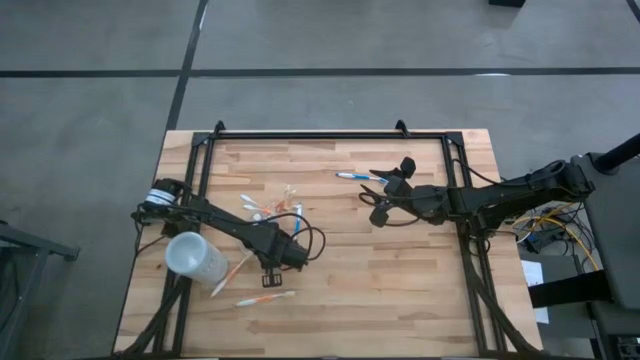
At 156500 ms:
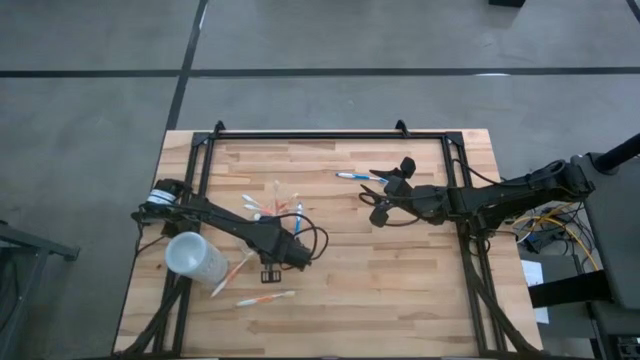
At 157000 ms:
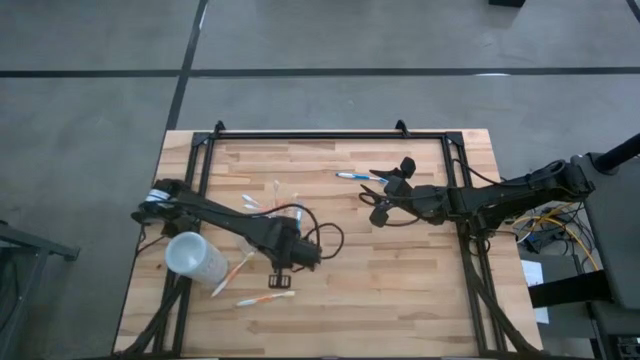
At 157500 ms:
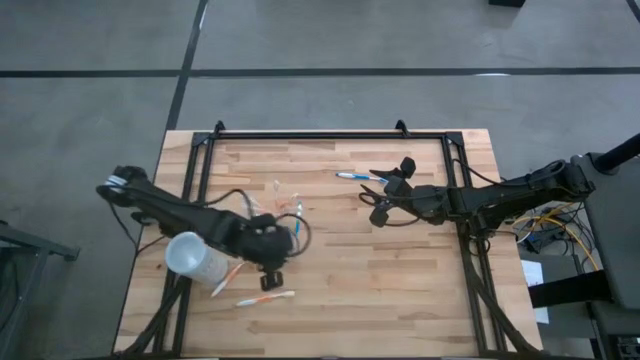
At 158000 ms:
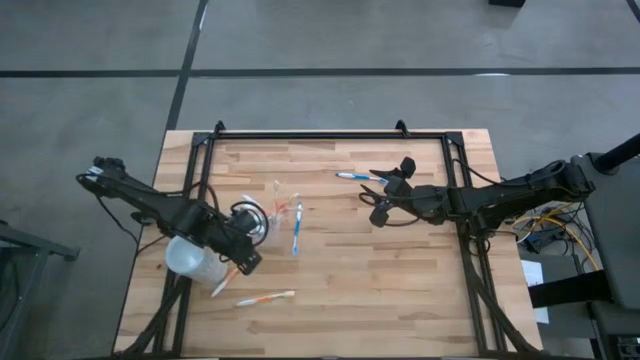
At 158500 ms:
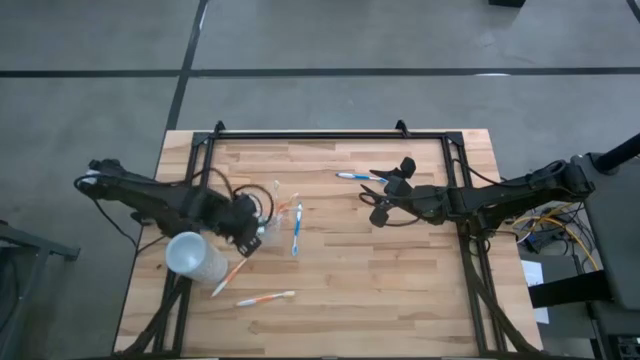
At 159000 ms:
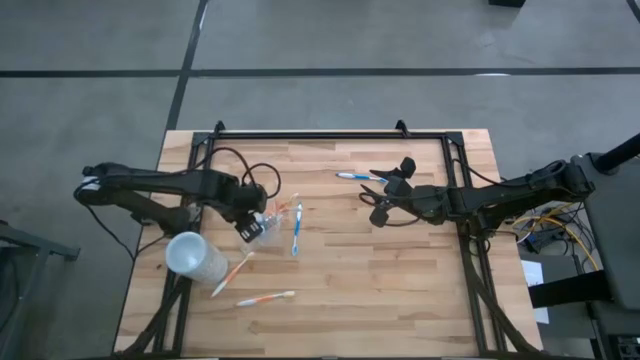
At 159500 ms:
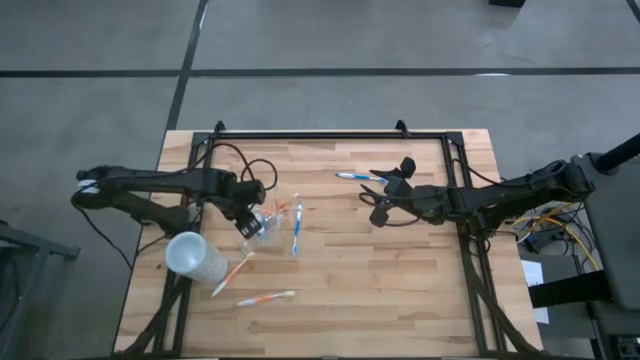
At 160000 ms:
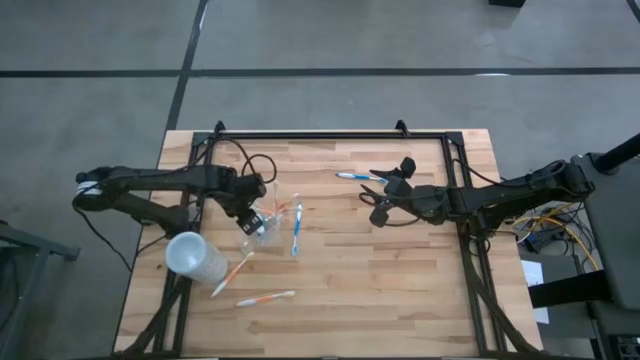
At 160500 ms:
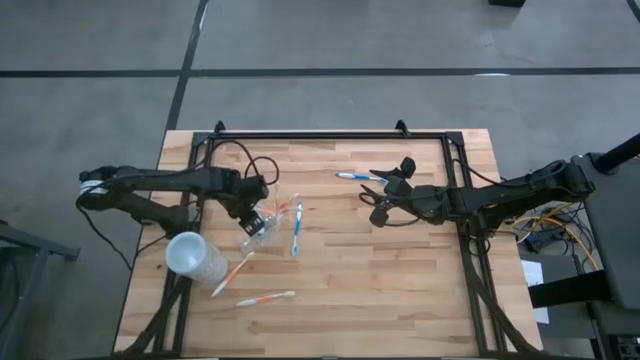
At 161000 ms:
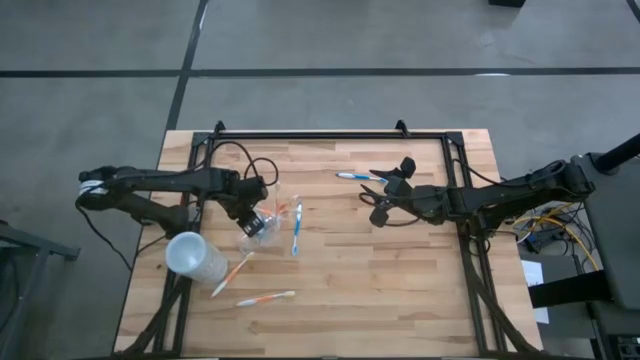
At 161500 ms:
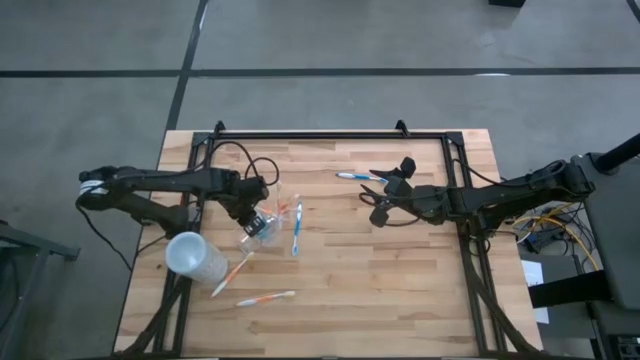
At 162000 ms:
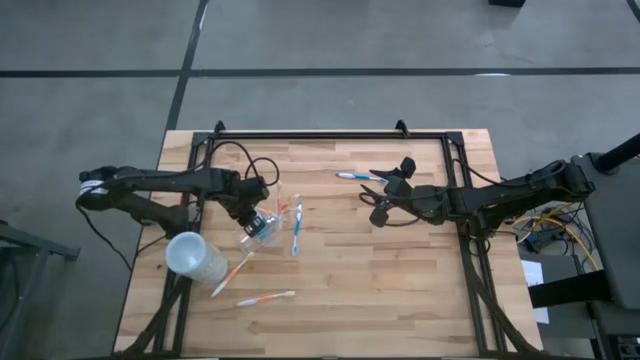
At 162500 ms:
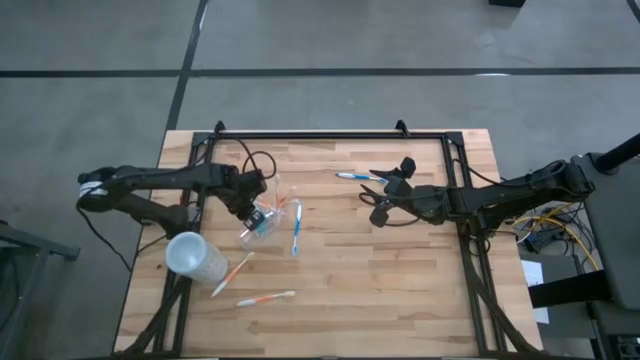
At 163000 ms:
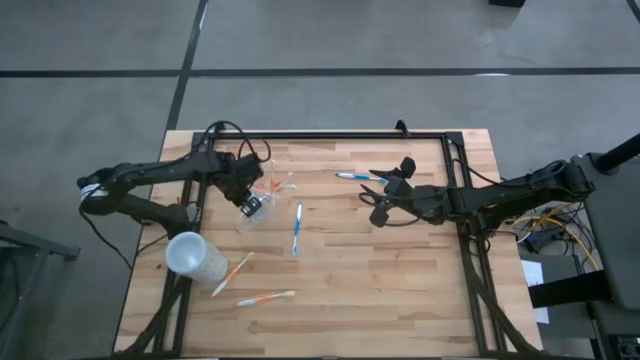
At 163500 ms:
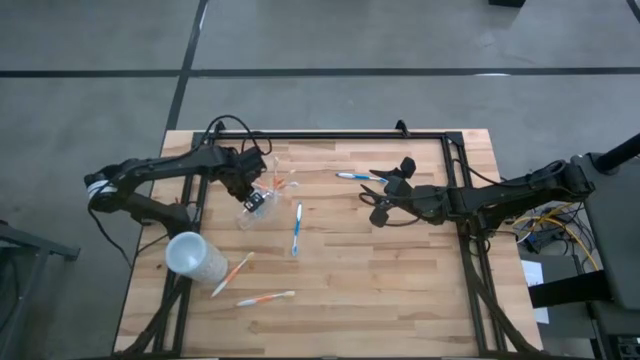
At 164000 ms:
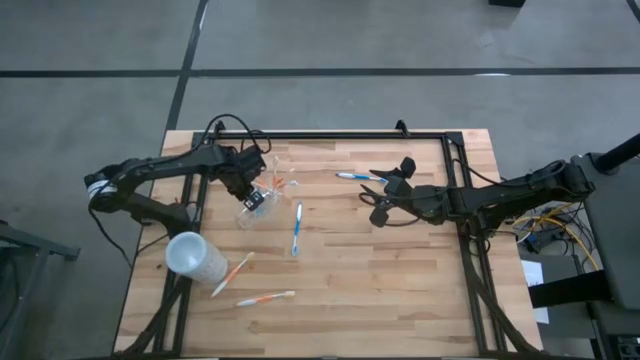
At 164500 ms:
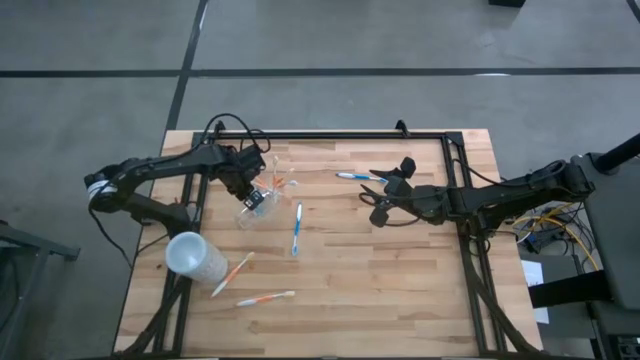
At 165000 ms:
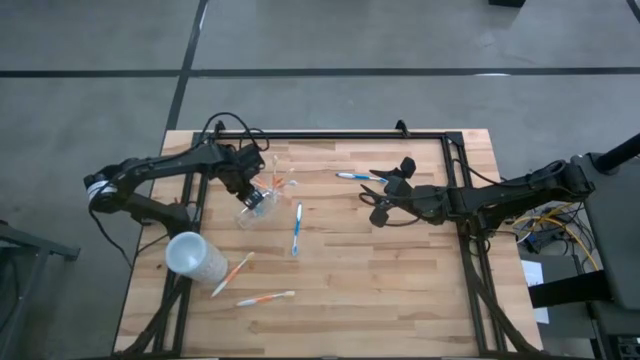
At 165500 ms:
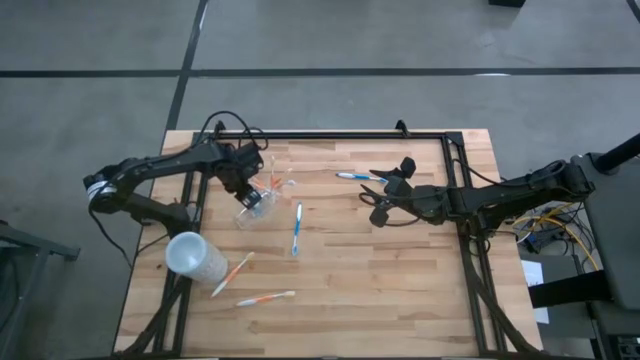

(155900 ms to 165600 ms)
Task: Pick & Place toothbrushing station
Adjust the transparent organizer

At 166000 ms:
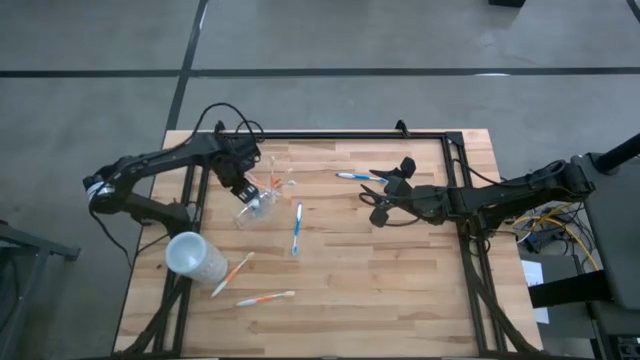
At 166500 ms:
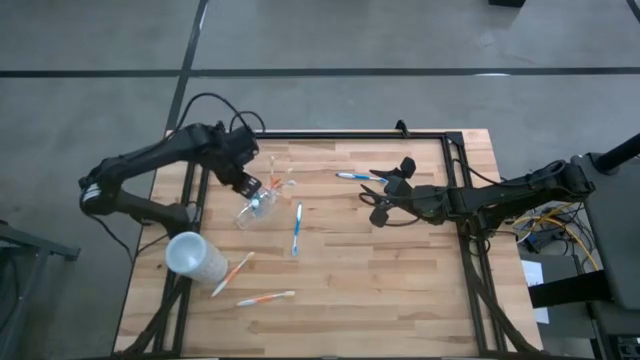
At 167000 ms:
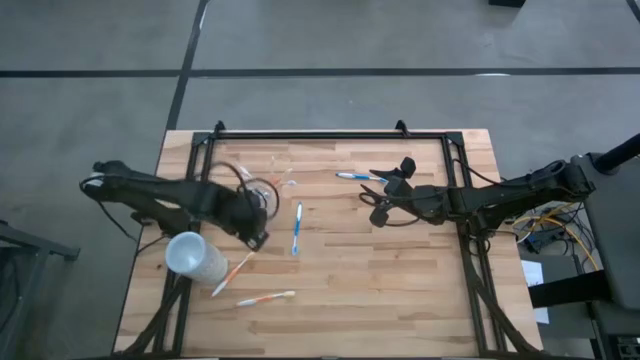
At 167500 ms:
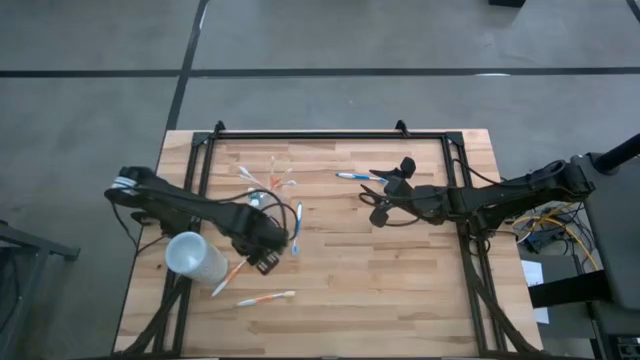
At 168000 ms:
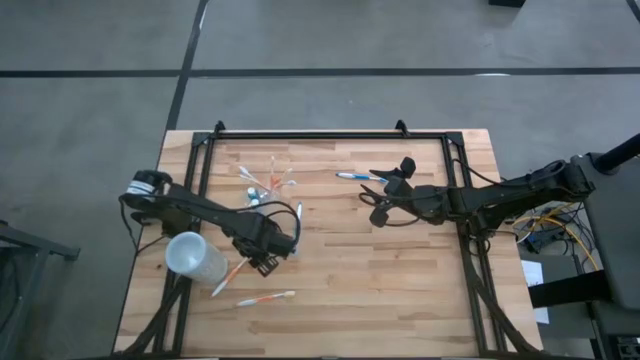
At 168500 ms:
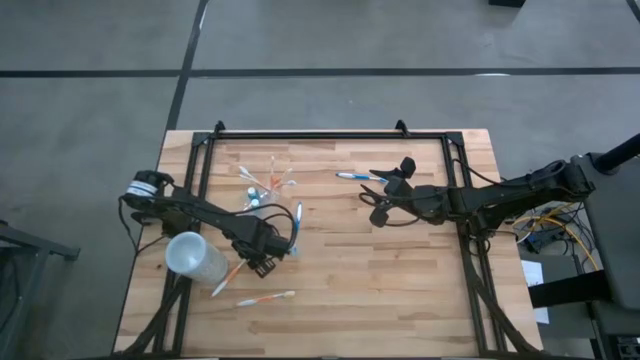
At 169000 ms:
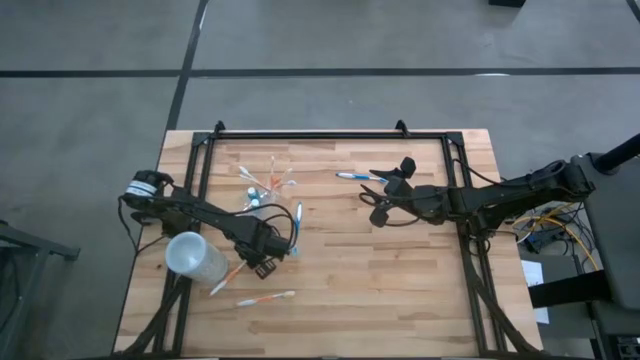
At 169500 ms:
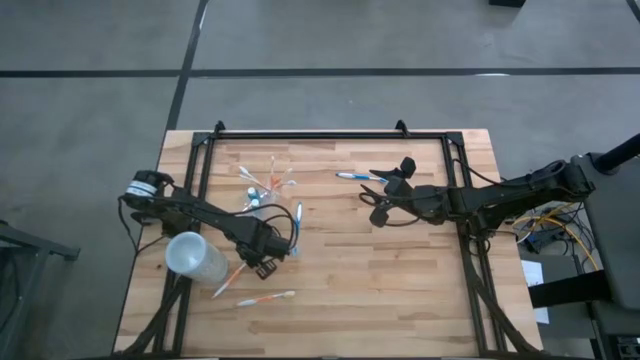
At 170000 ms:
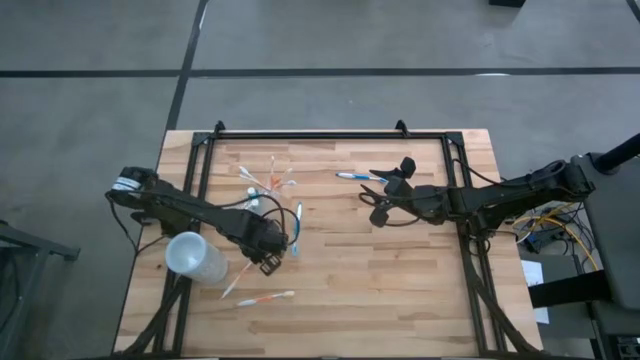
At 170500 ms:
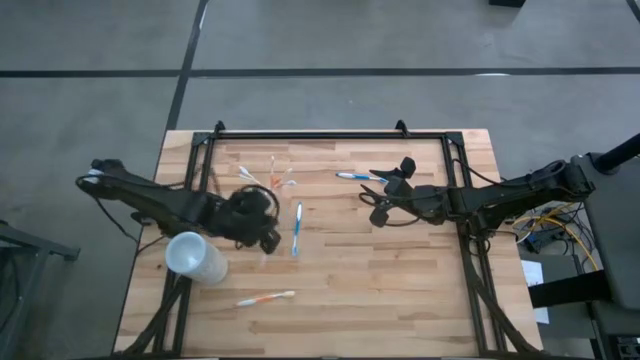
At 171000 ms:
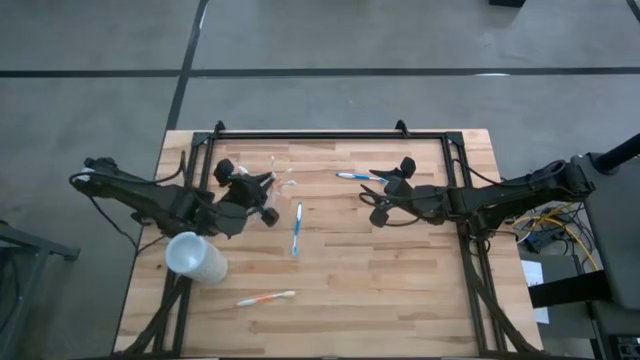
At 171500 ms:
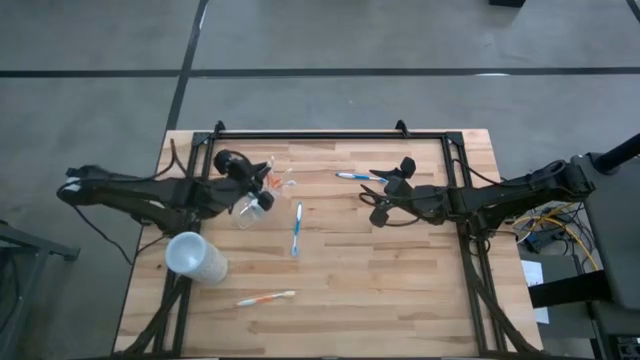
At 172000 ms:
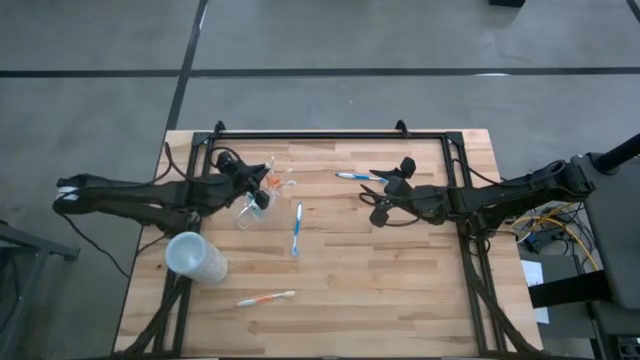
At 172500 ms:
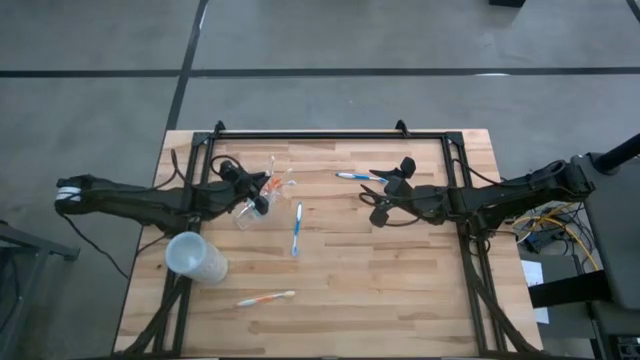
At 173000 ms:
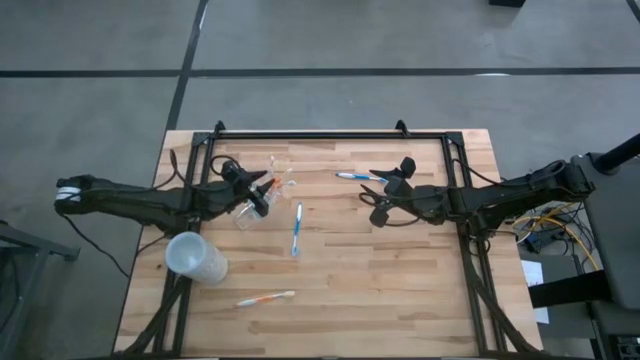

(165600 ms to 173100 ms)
Put the orange toothbrush into the transparent organizer

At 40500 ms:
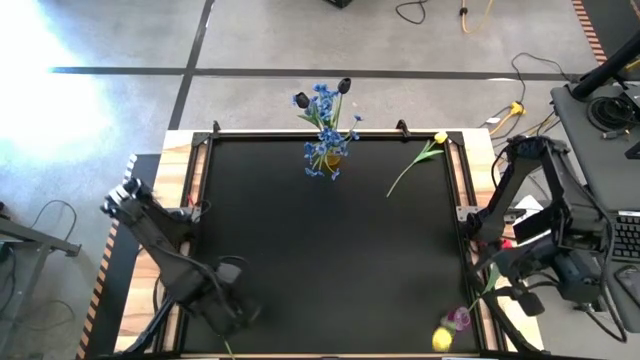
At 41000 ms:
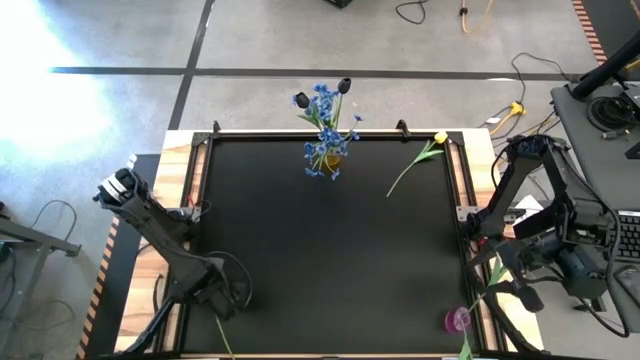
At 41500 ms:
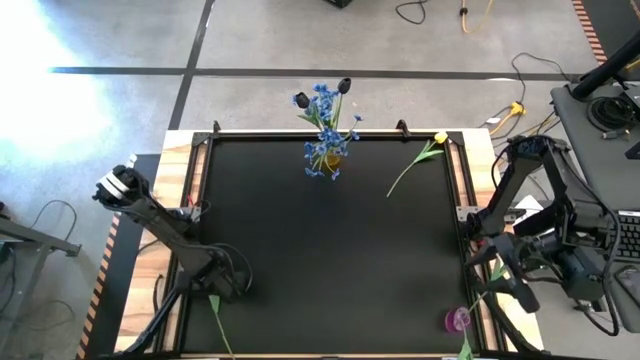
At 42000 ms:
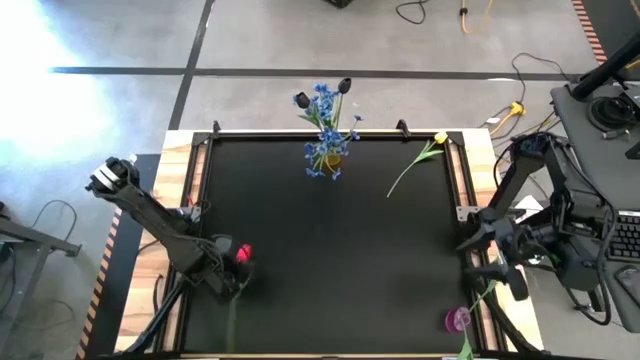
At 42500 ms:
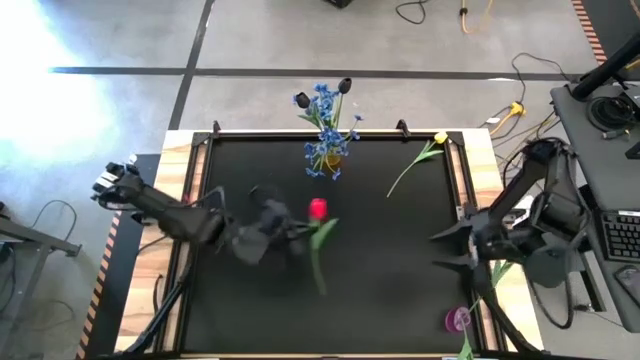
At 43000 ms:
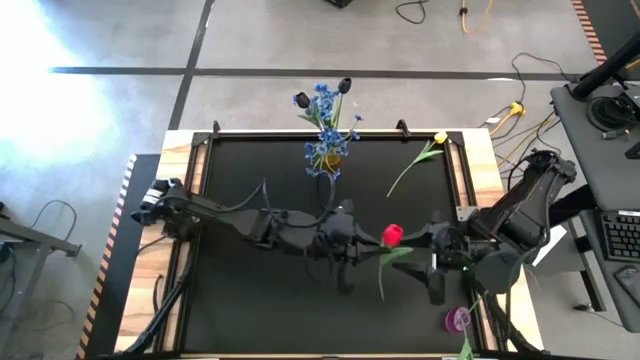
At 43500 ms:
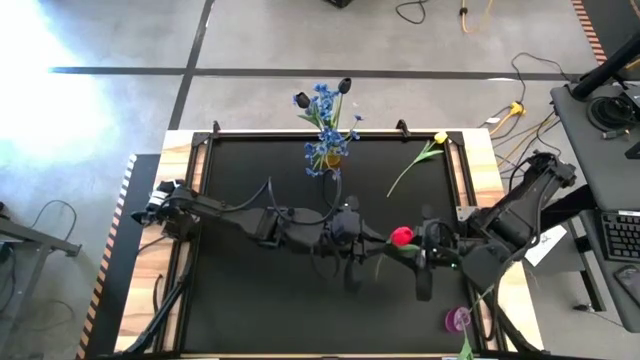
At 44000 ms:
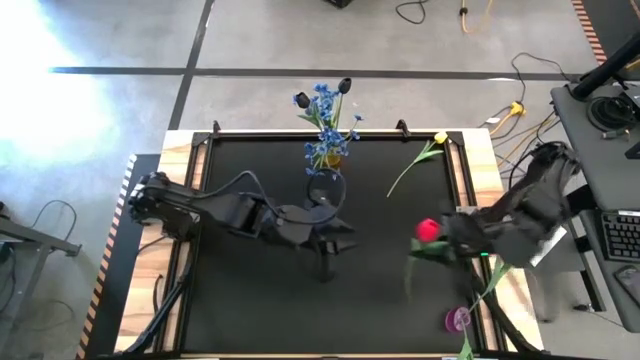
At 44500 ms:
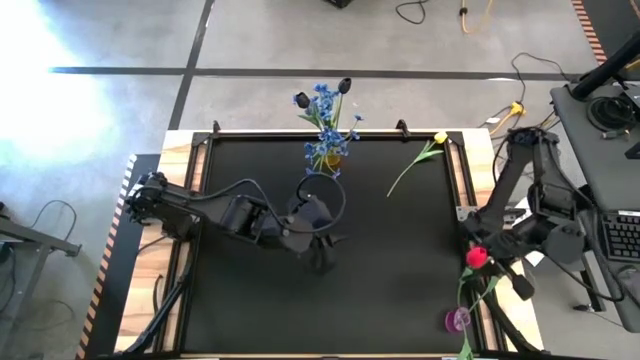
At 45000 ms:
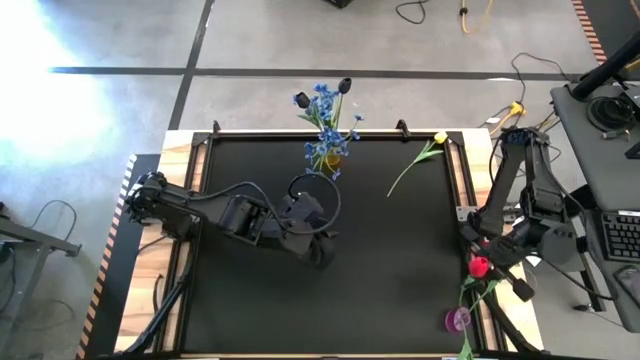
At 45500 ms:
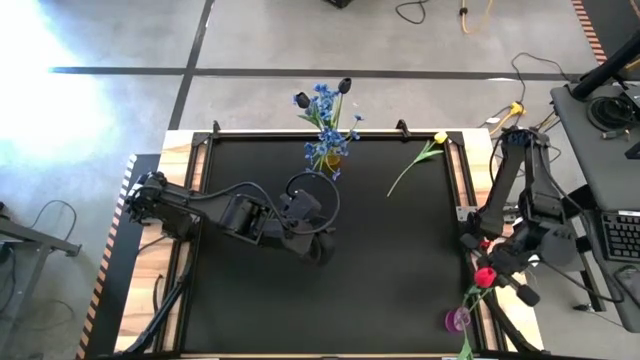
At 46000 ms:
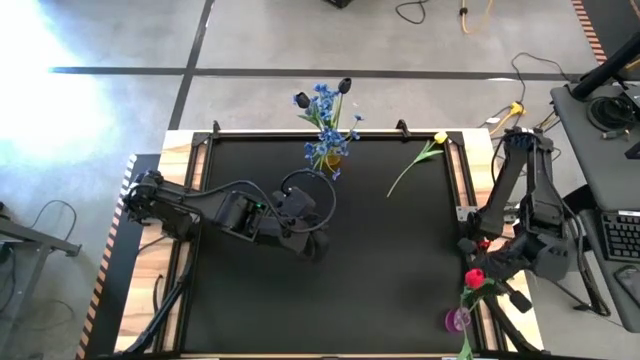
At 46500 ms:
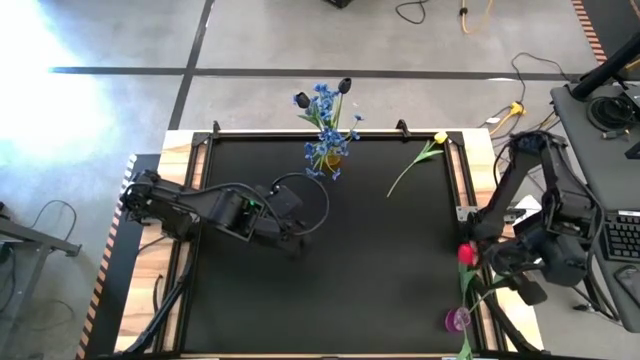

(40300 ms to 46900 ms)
Task: Sort flowers into vase by color
Put the red flower into the purple vase
